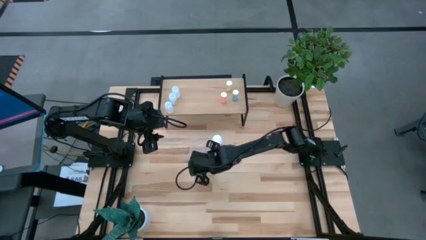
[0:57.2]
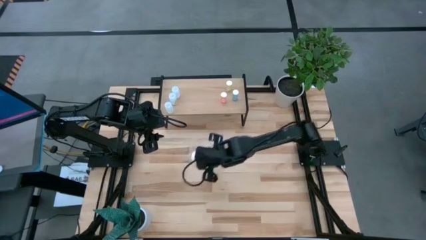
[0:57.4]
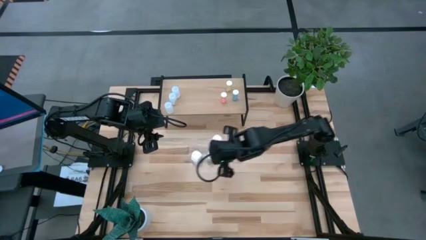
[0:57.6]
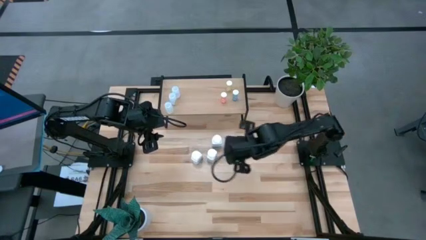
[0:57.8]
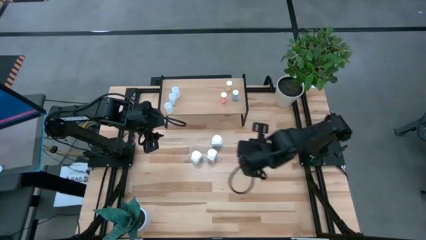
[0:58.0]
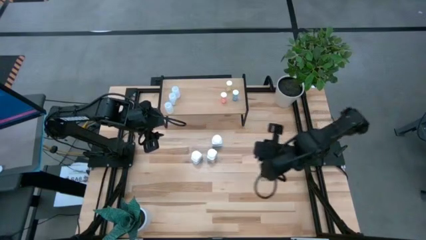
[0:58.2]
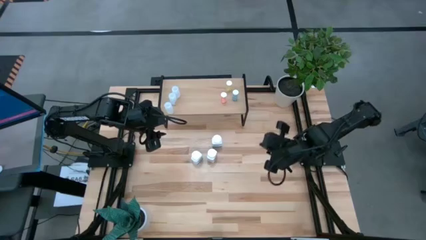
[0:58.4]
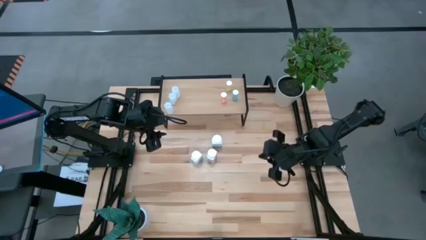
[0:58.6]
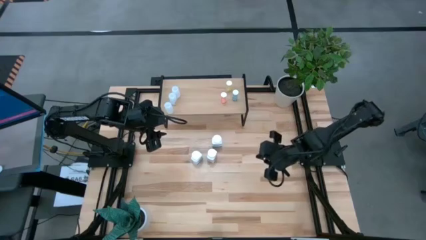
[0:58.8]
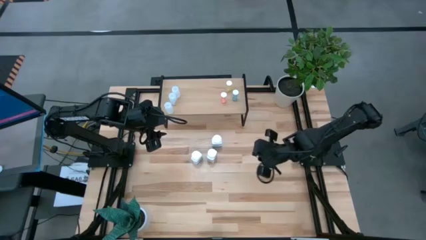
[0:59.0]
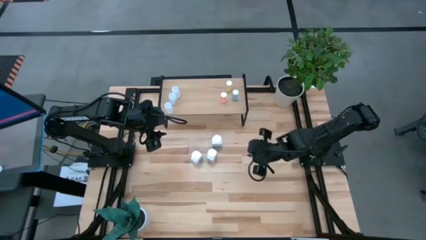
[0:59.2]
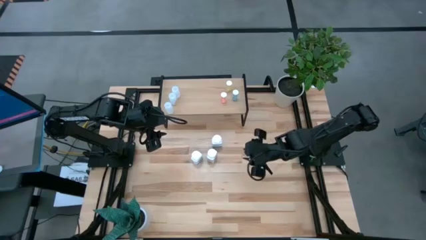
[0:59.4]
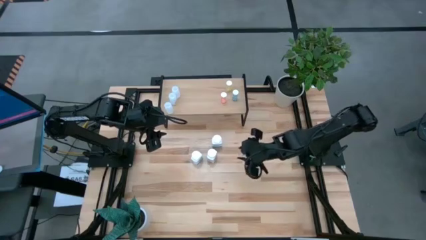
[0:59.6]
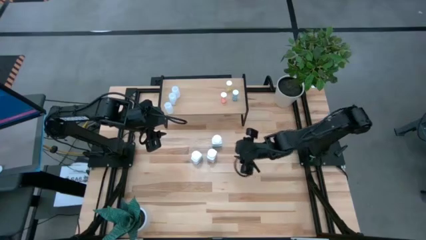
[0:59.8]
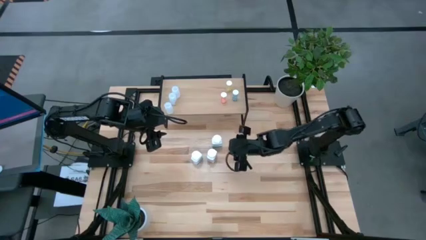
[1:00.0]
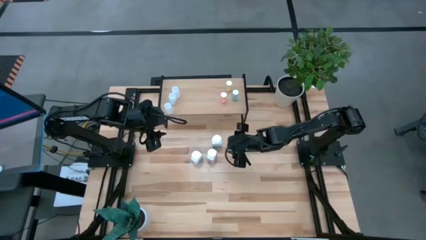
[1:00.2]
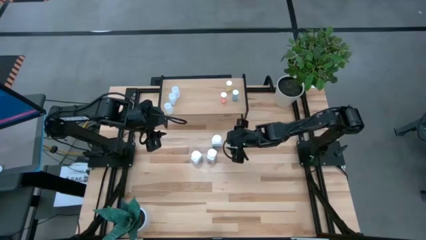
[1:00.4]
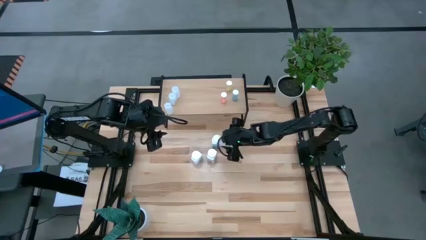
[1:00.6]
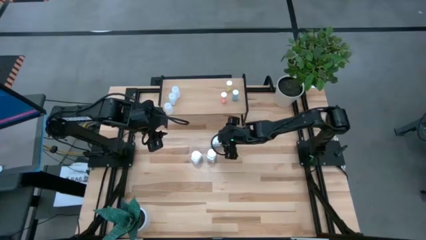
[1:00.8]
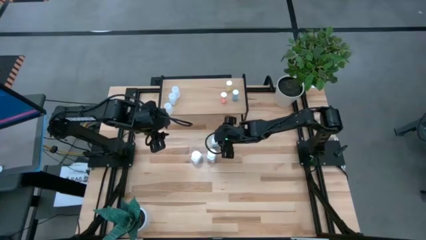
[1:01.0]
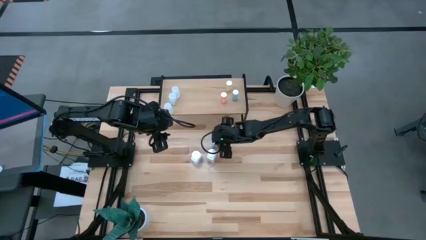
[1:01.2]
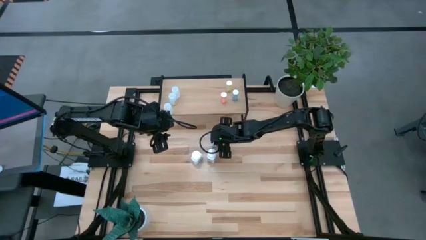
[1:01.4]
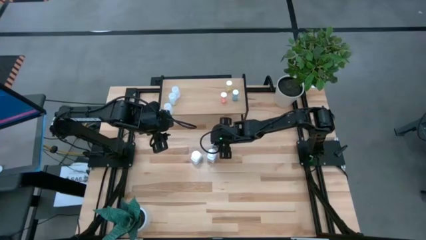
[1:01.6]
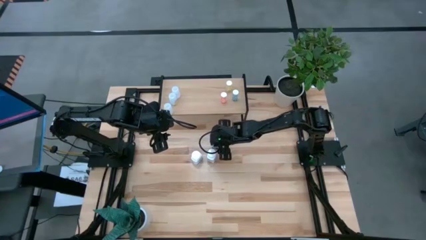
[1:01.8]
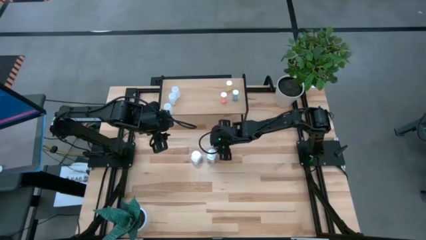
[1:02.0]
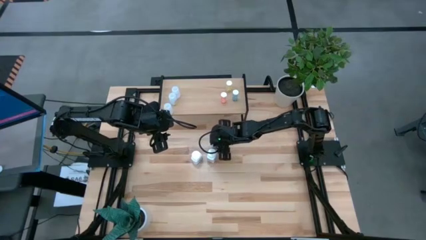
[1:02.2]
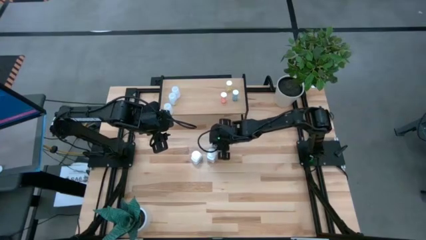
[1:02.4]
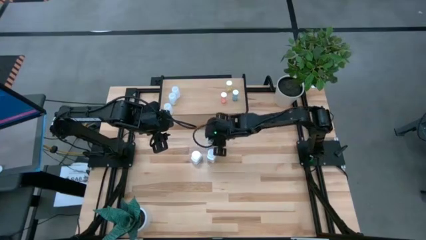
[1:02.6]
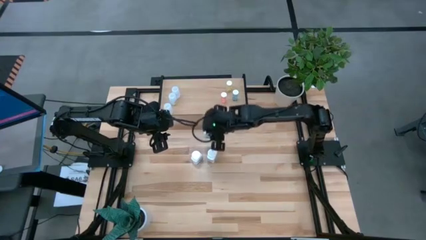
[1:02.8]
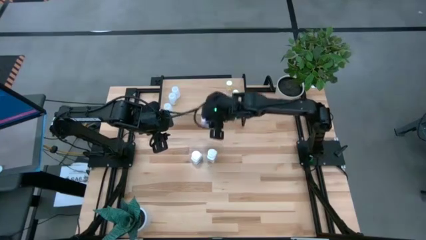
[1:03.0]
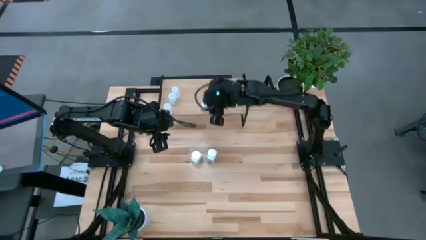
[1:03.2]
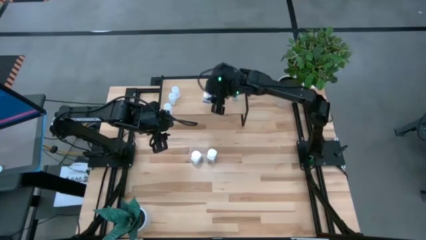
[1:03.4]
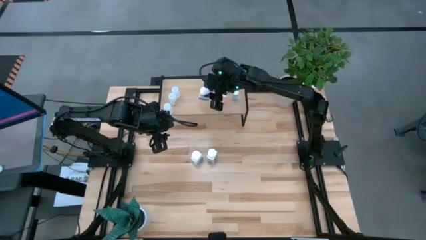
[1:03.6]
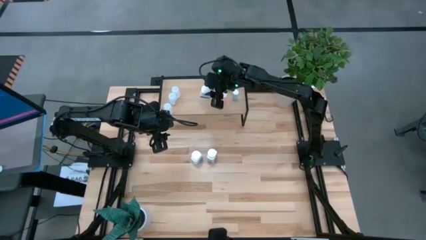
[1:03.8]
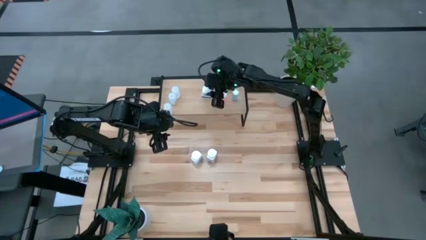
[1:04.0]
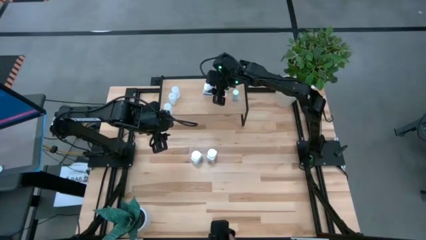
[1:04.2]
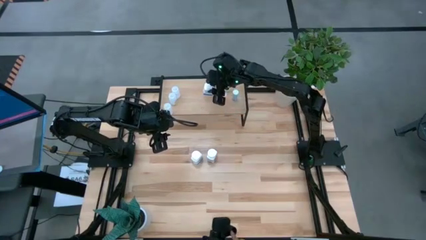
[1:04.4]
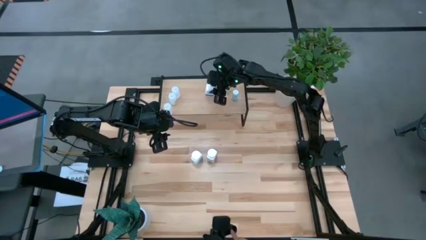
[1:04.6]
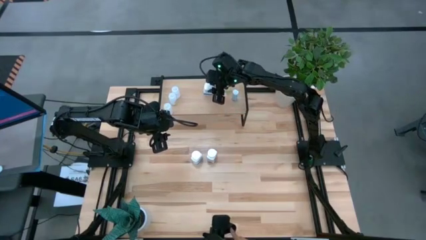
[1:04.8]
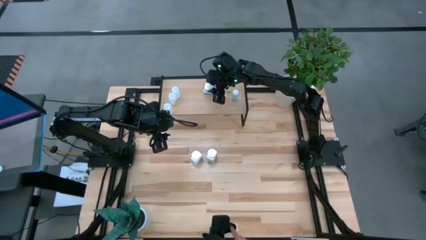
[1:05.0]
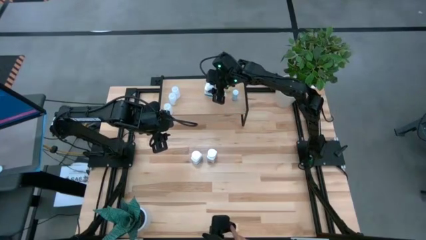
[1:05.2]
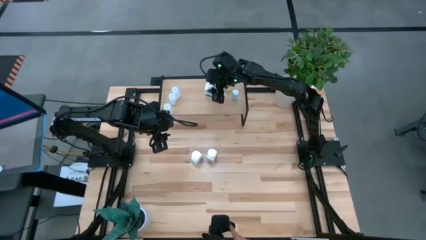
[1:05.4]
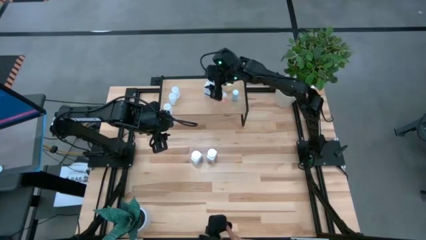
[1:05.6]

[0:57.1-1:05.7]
Task: Pick and place medicine bottles onto shelf by color
Put the top white pill bottle on the shelf

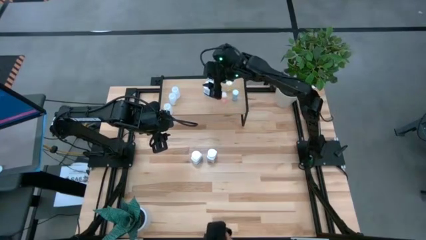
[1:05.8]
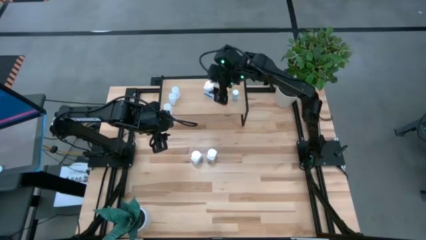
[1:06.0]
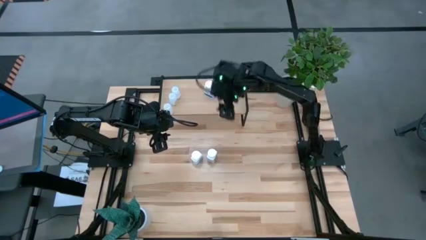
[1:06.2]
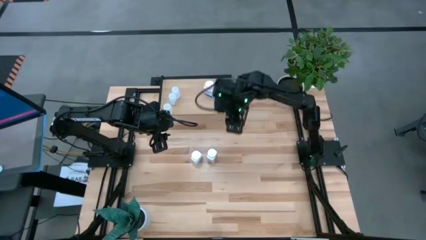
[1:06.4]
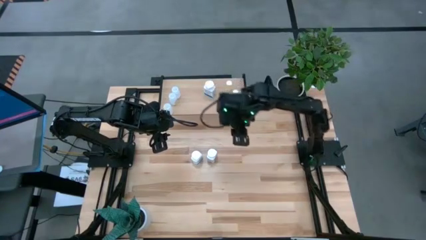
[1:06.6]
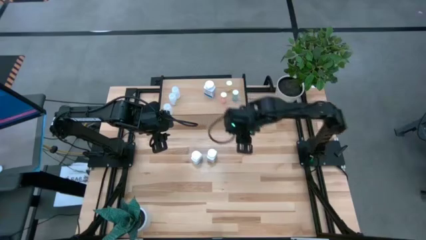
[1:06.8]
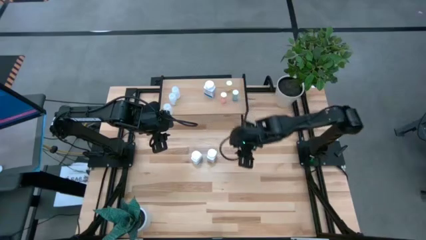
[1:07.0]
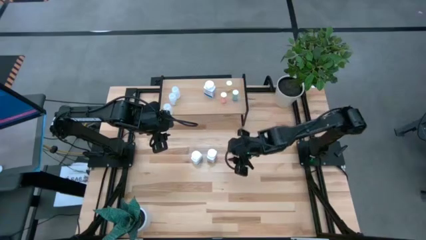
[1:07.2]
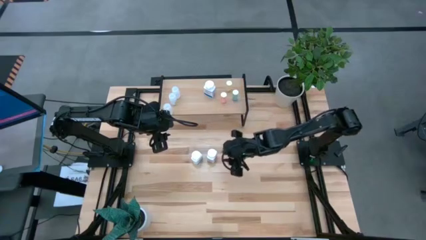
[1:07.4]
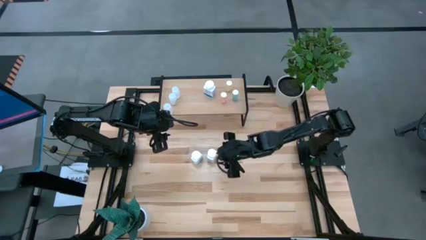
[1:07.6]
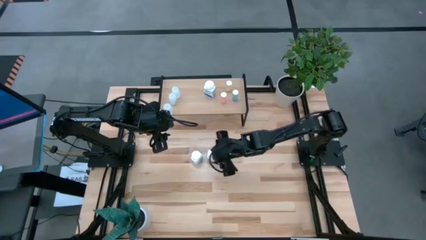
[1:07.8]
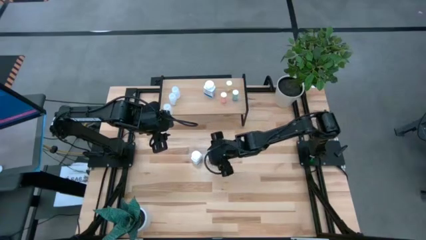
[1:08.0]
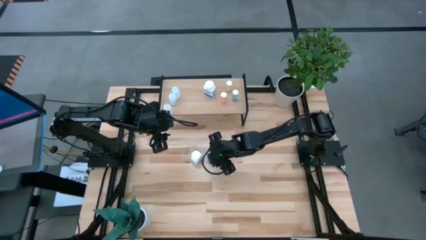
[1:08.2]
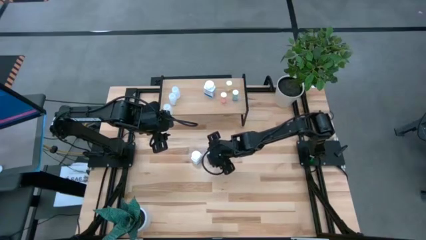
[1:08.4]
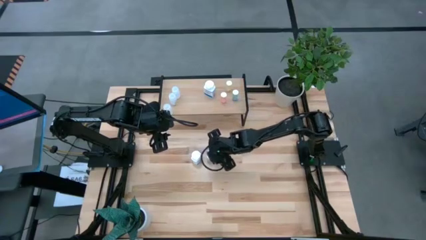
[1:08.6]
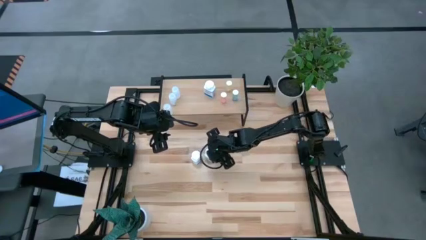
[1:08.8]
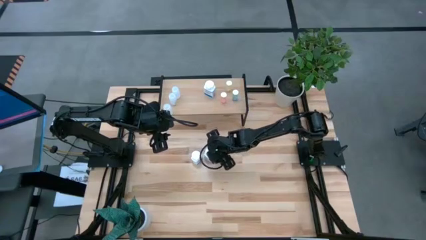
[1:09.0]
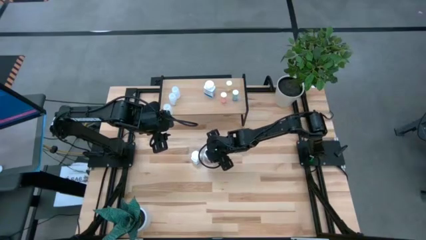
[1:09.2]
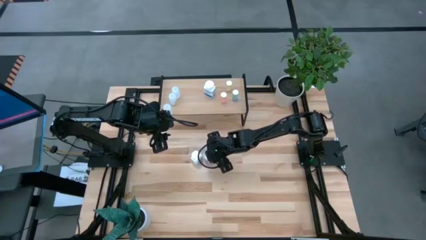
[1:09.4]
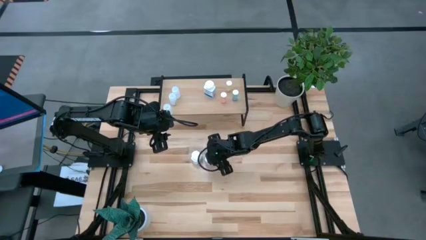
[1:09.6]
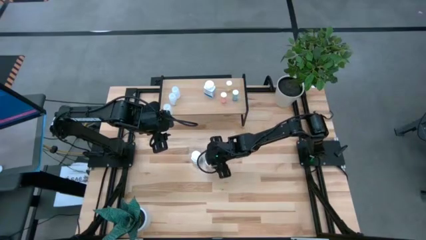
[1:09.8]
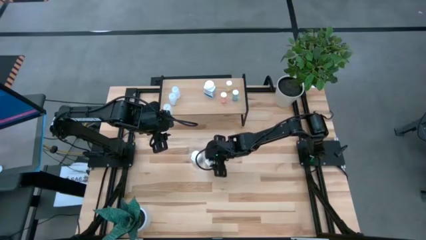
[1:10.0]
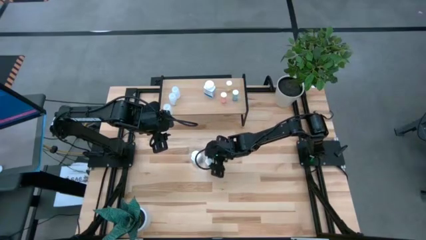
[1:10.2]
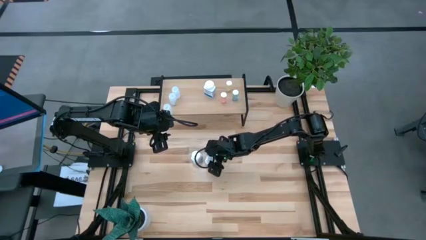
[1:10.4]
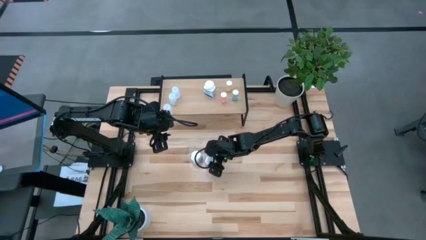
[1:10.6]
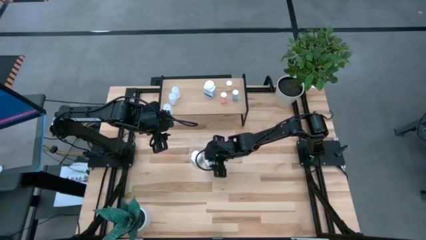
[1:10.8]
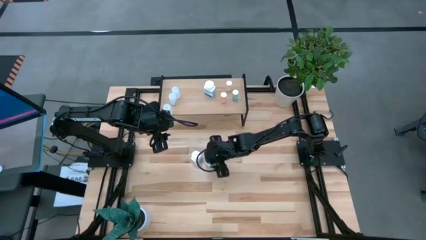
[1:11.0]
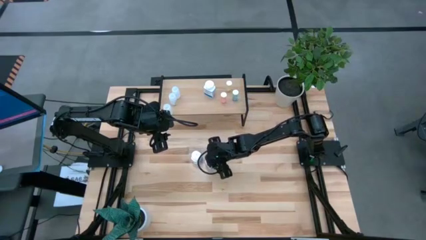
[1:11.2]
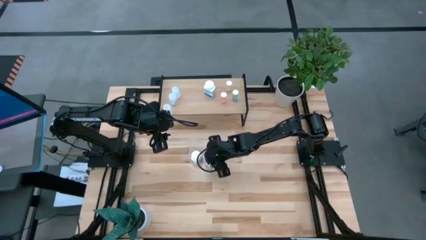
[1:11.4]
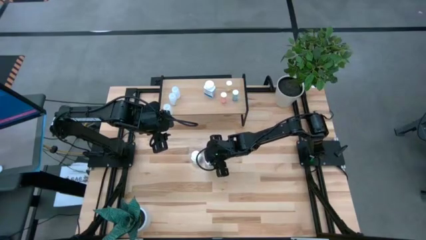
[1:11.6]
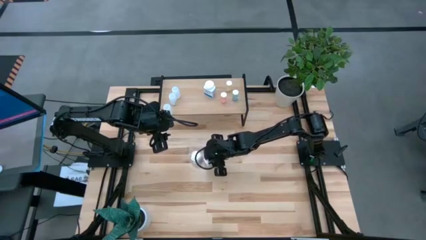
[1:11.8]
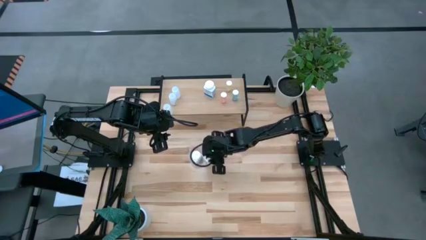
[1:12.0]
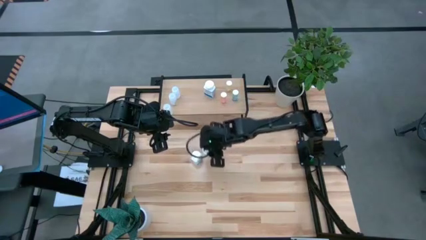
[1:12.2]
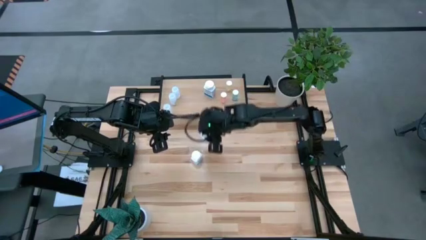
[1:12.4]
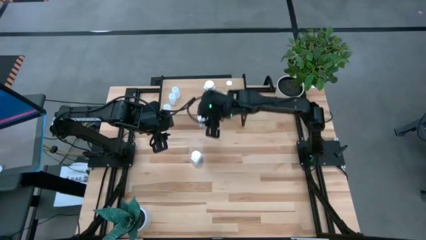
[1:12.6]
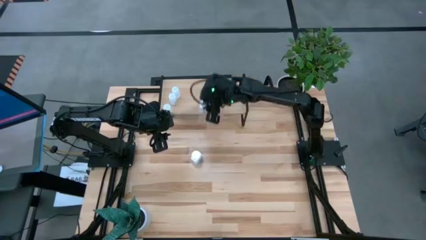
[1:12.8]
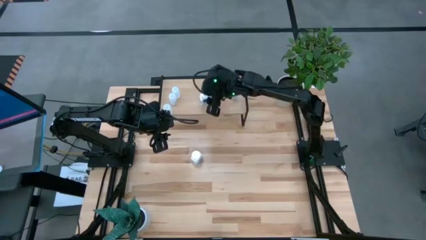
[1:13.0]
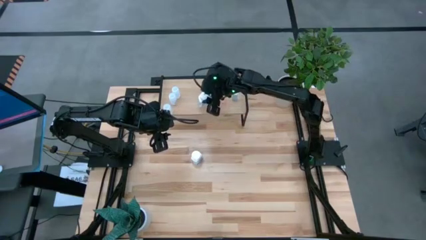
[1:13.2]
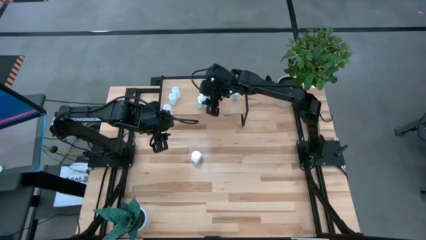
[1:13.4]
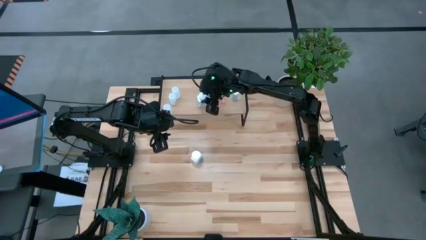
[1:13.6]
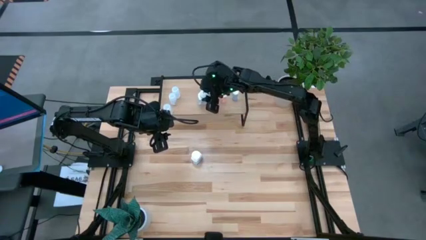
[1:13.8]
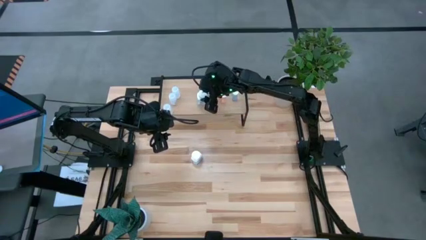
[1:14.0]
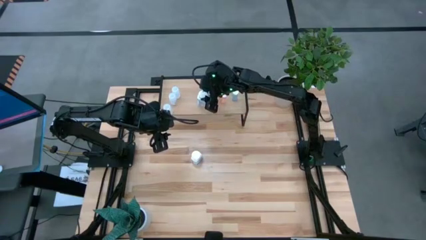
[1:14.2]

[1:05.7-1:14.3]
Put the right white pill bottle on the shelf
